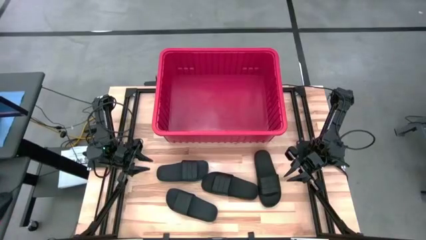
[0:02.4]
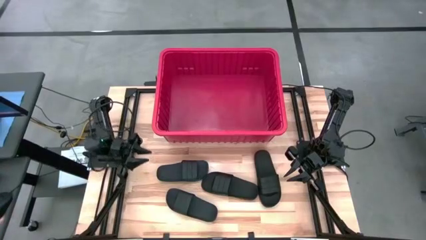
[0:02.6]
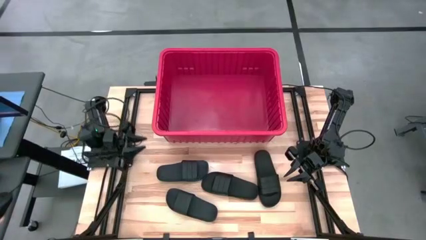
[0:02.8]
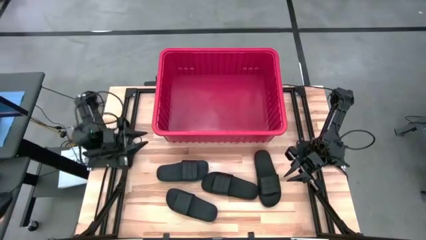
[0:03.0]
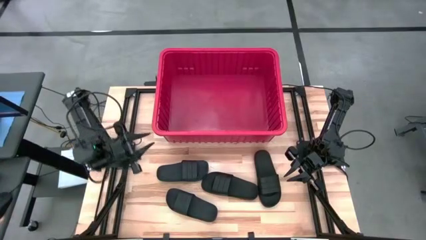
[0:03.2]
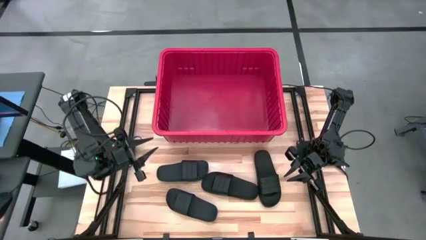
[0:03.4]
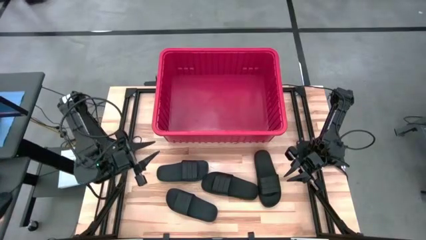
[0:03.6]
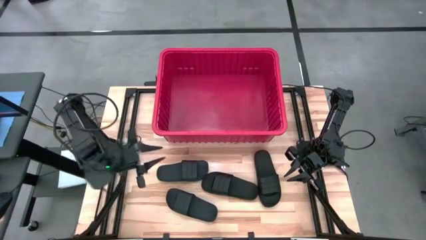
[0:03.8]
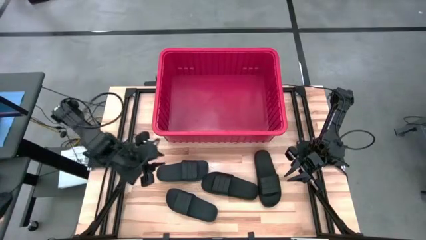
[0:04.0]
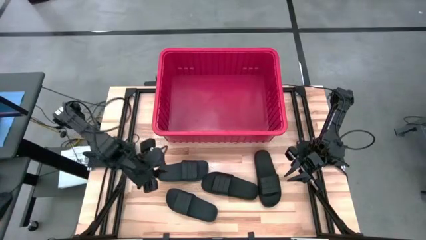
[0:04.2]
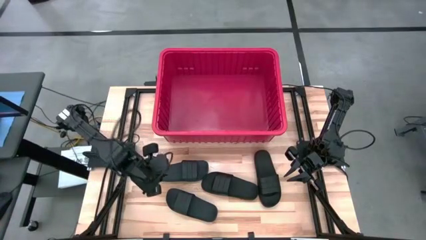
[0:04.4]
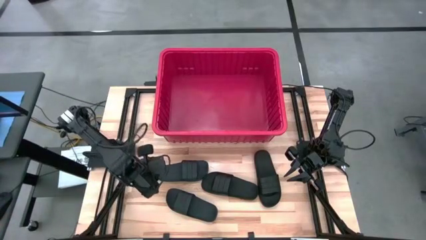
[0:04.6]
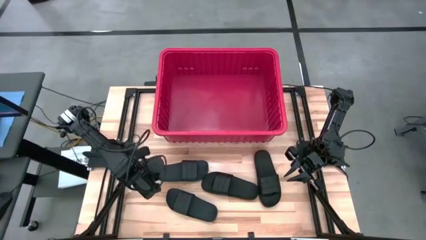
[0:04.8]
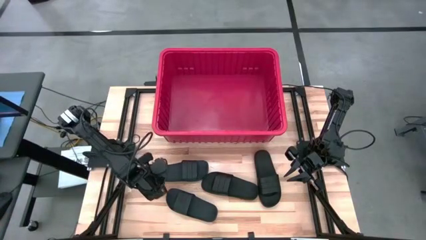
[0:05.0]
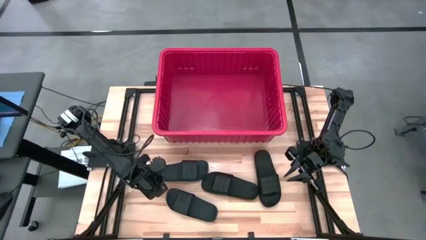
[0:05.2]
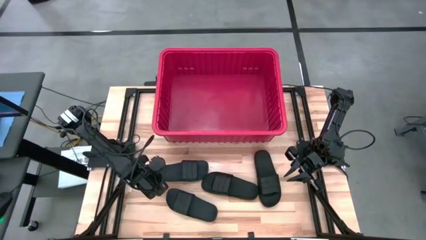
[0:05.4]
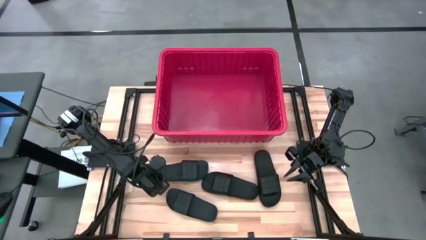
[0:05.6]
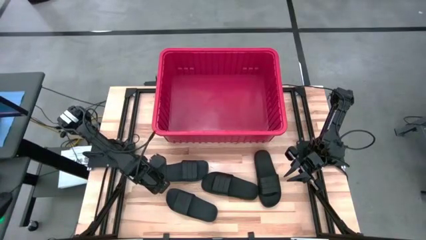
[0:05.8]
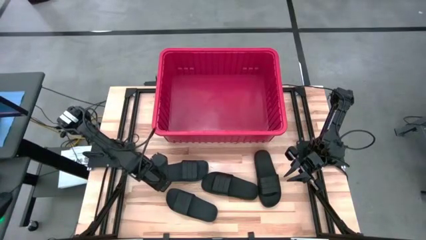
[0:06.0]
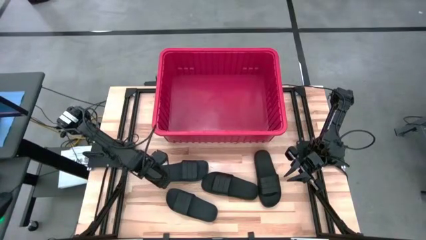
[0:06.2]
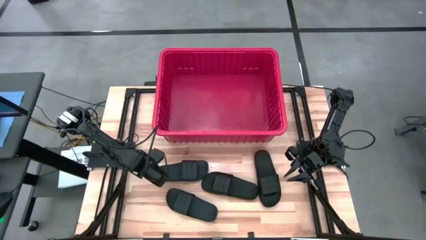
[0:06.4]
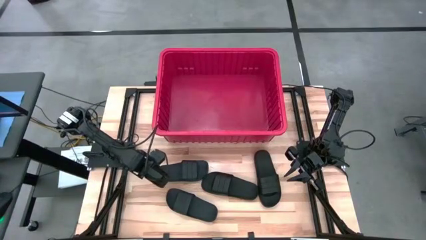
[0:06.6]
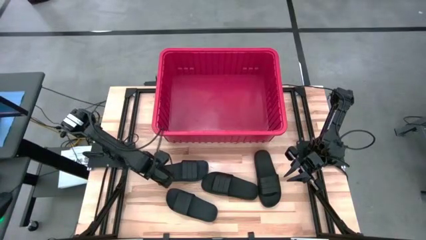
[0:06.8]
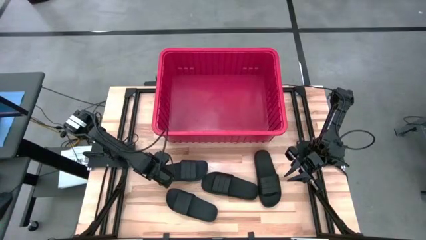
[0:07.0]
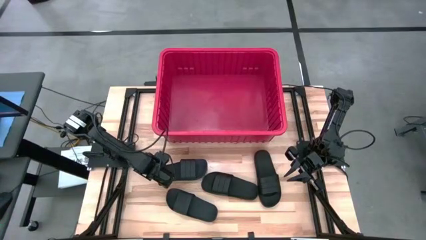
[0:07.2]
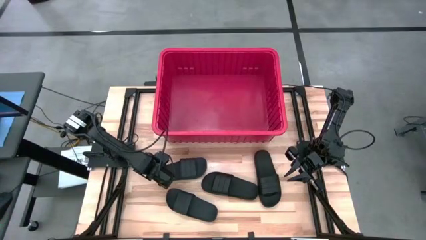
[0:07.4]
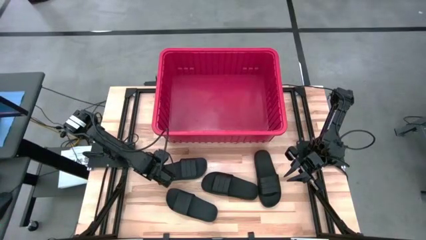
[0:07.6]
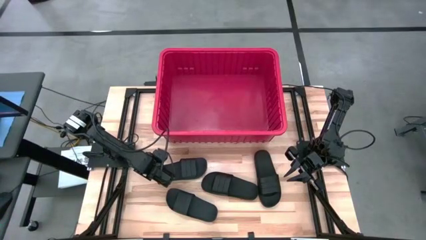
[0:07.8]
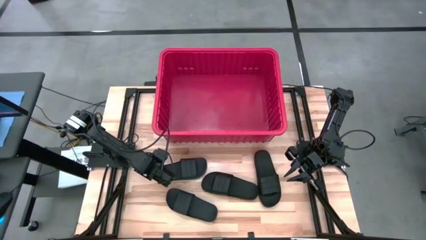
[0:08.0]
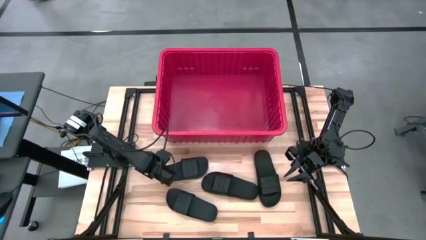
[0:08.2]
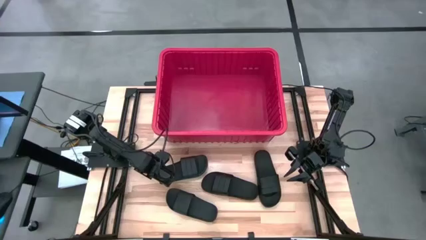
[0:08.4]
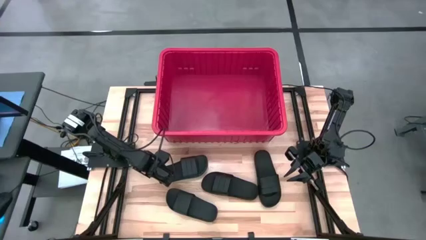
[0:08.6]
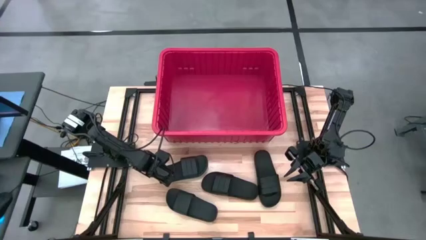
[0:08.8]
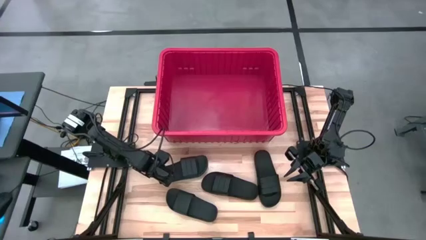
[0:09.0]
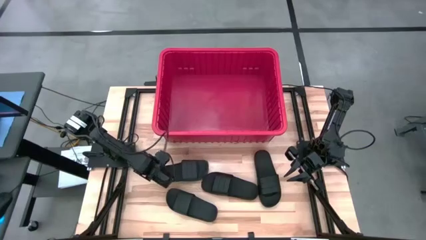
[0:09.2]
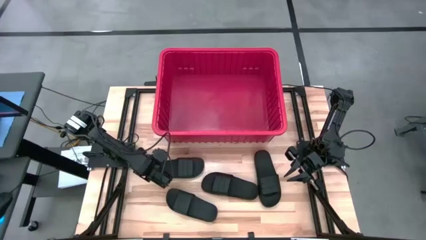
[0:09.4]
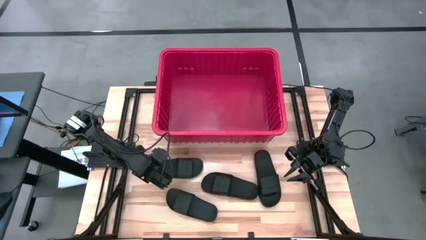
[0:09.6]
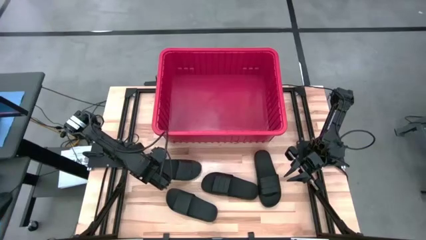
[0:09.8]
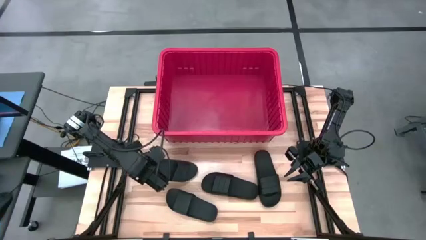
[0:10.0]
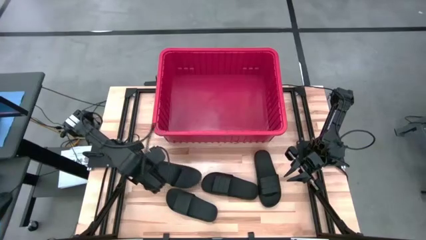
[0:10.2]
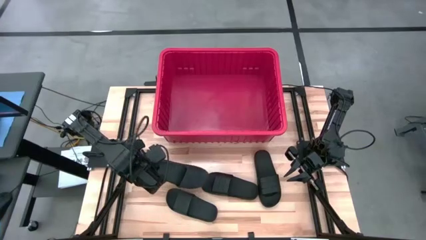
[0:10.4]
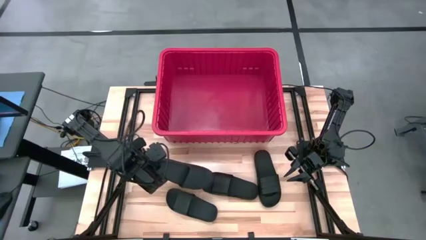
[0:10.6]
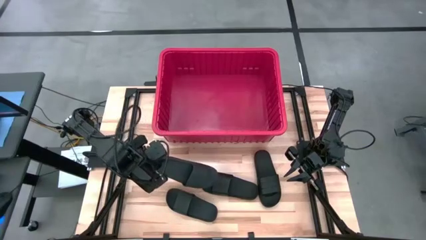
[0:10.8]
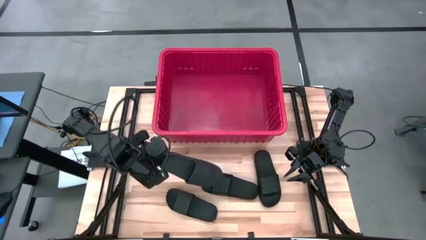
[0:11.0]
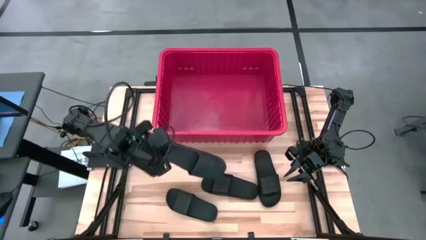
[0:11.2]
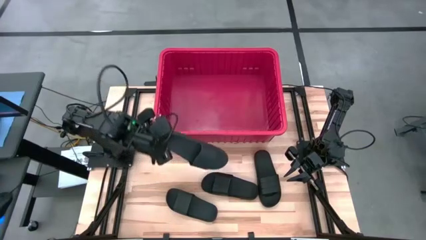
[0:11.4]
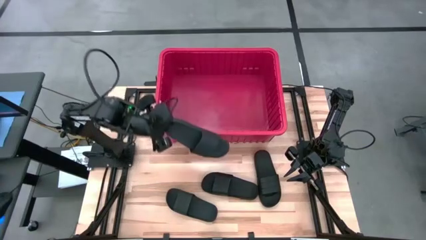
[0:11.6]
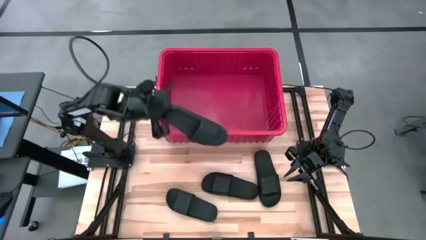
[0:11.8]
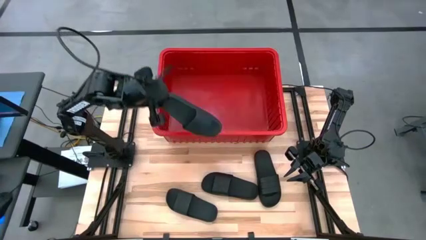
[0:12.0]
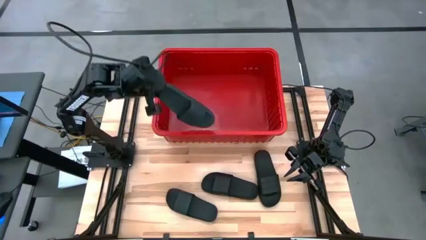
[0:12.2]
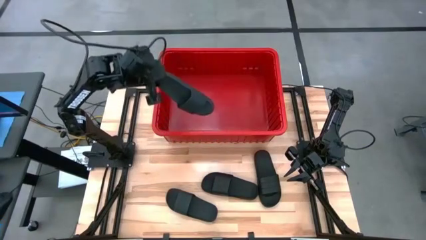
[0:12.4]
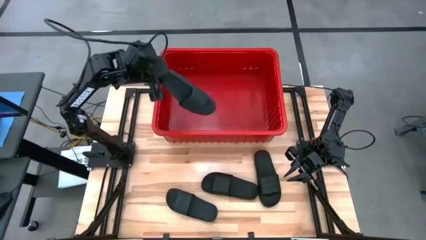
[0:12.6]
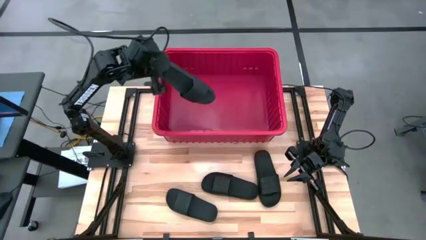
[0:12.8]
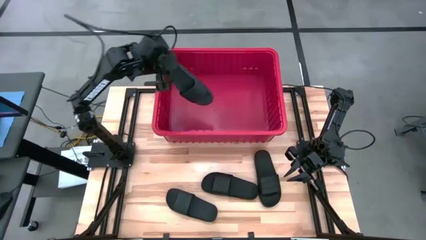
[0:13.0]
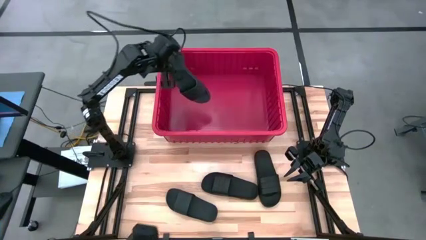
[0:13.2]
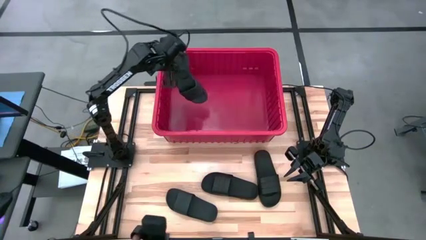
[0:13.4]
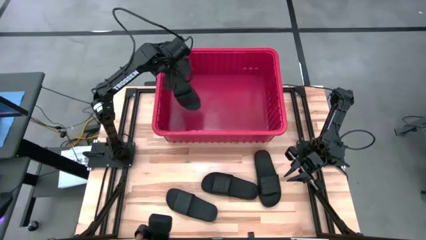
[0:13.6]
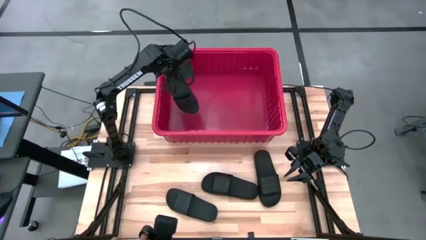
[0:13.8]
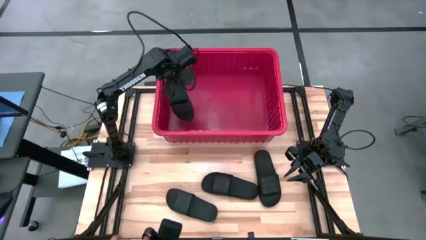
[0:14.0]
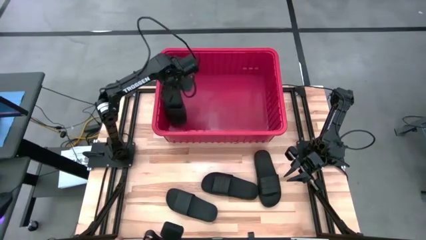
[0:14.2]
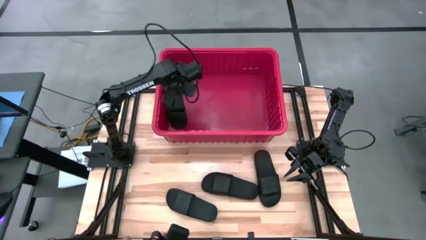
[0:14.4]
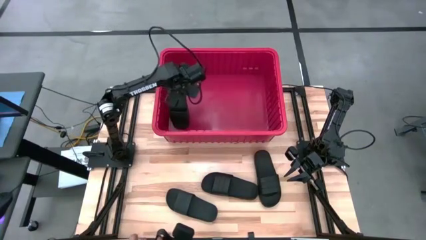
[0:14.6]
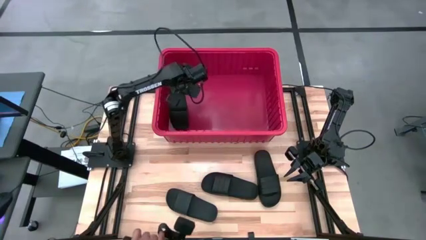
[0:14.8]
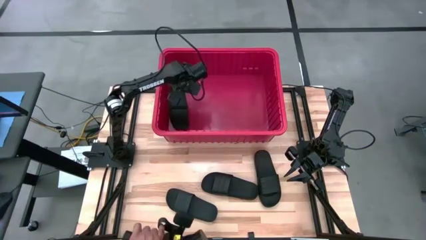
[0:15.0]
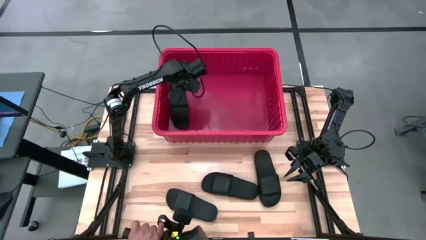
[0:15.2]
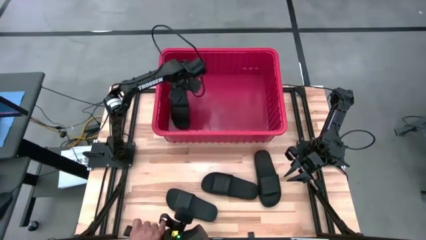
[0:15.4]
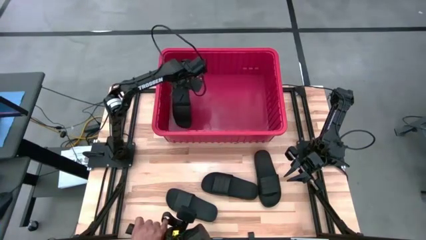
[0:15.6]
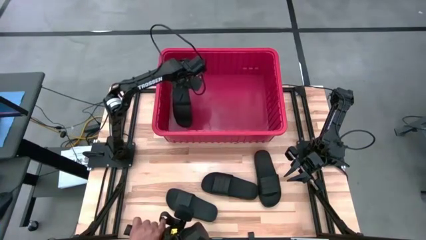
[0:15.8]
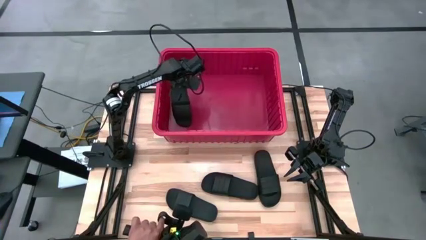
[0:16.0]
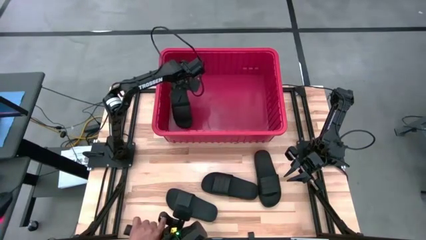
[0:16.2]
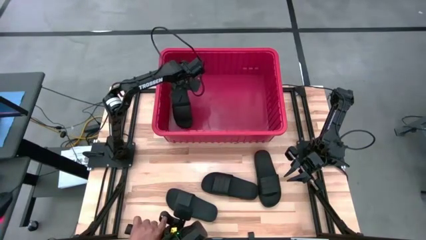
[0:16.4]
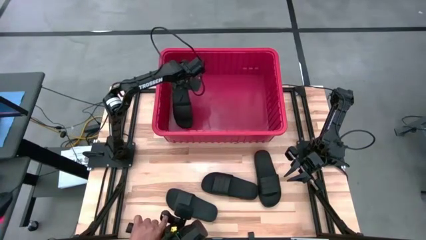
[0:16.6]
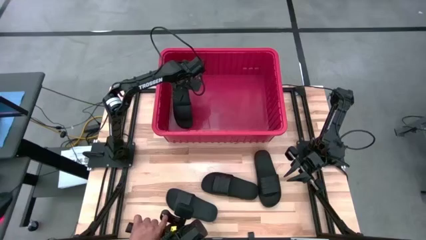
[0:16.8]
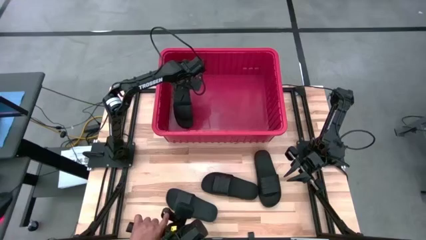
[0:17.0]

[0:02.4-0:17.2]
Task: Pick and place slides into bin
Put the black slide into the red bin
